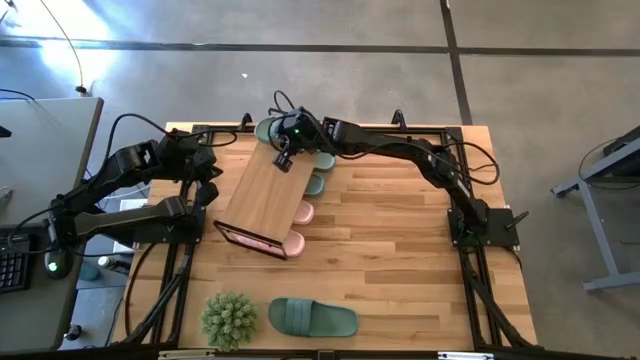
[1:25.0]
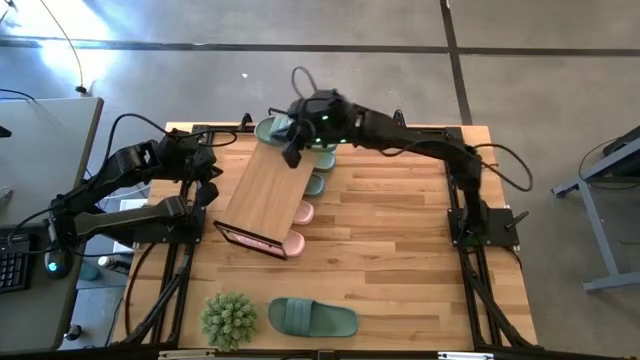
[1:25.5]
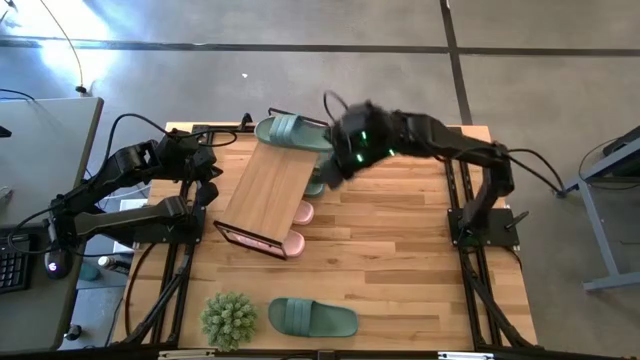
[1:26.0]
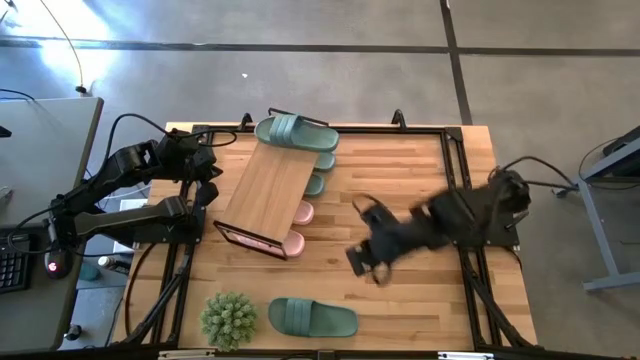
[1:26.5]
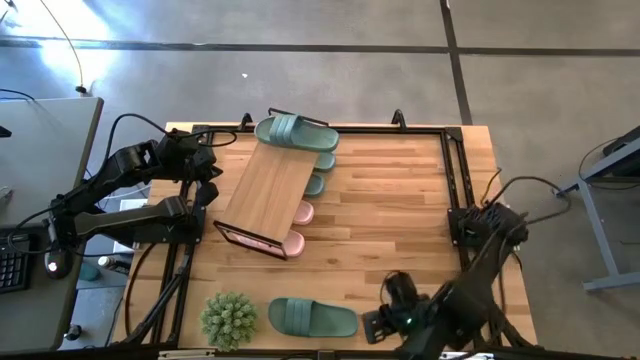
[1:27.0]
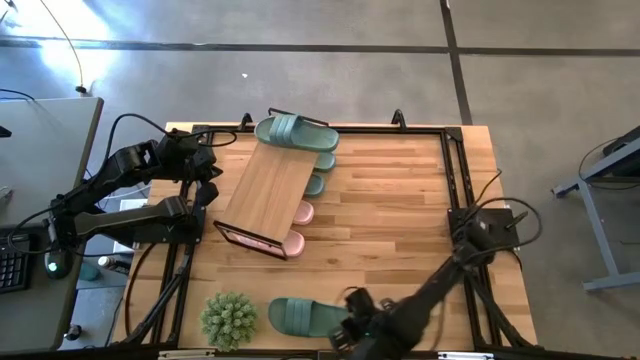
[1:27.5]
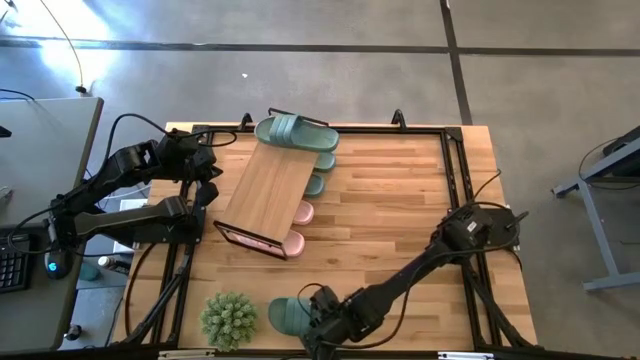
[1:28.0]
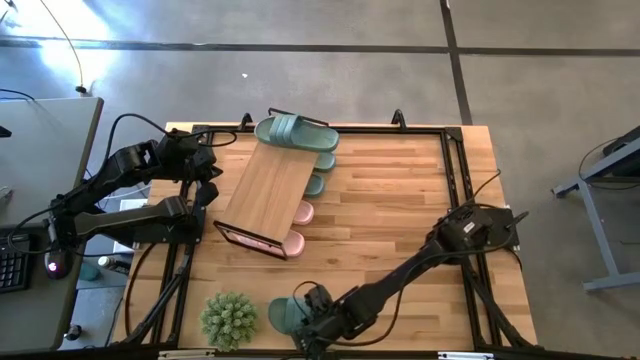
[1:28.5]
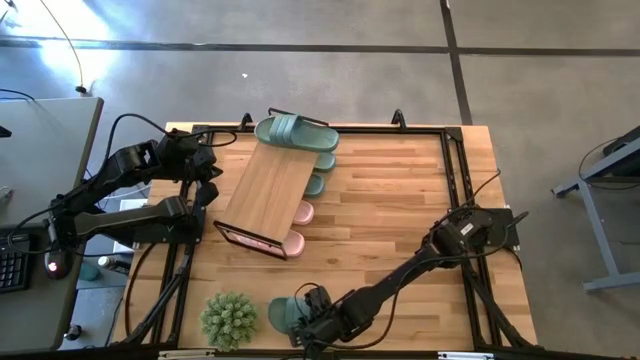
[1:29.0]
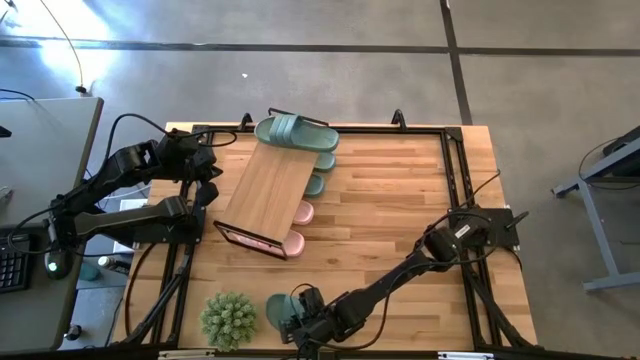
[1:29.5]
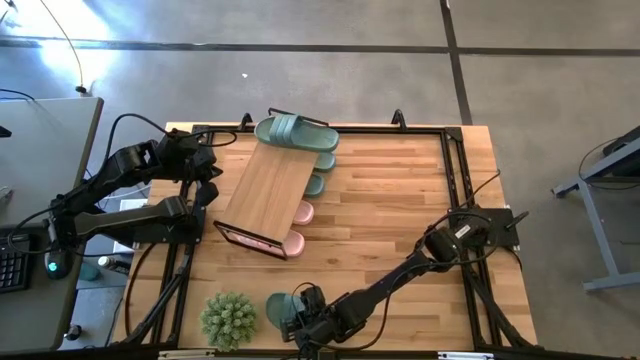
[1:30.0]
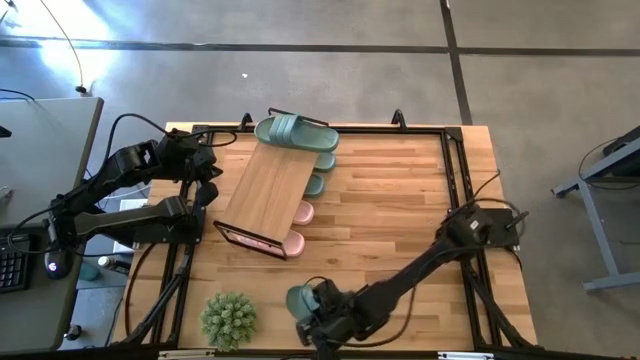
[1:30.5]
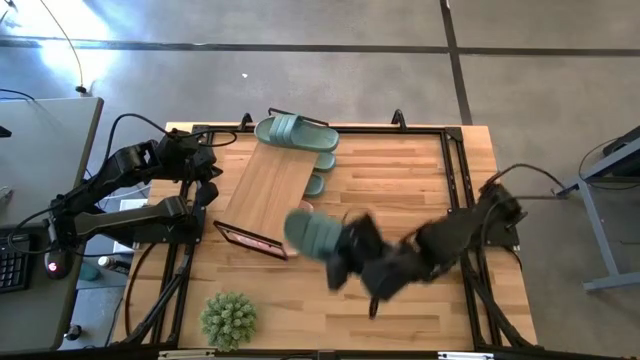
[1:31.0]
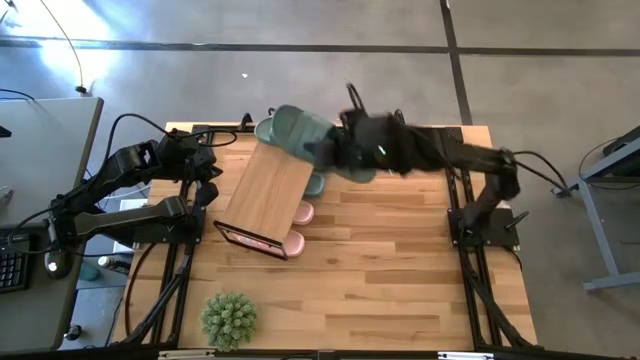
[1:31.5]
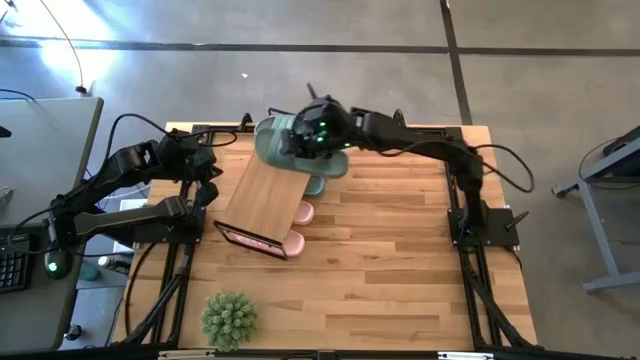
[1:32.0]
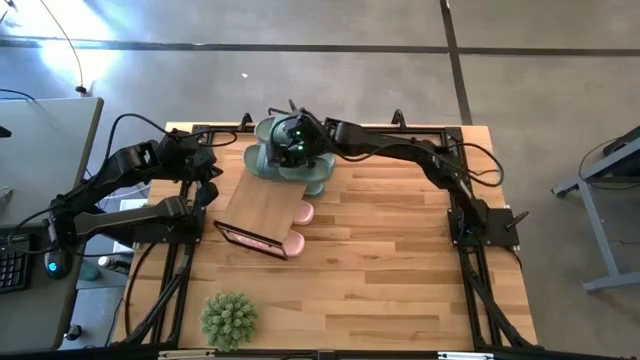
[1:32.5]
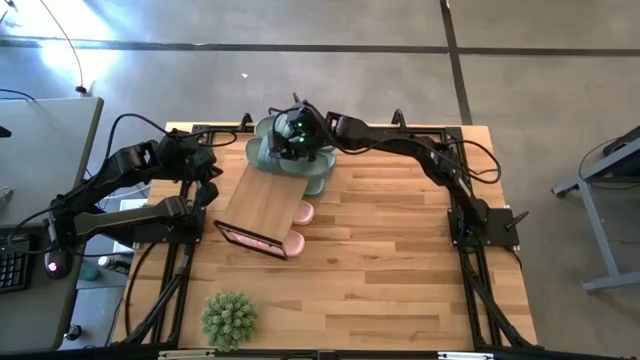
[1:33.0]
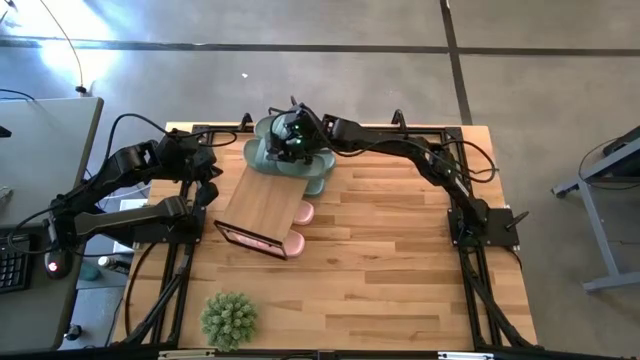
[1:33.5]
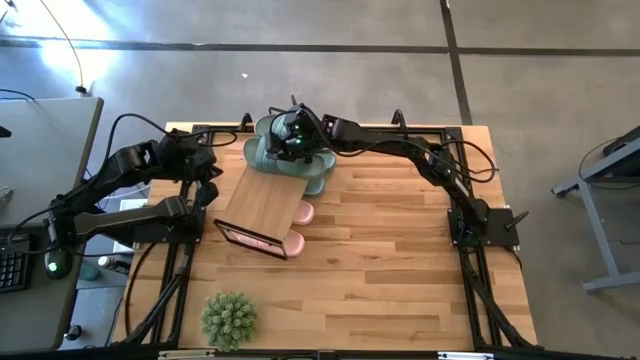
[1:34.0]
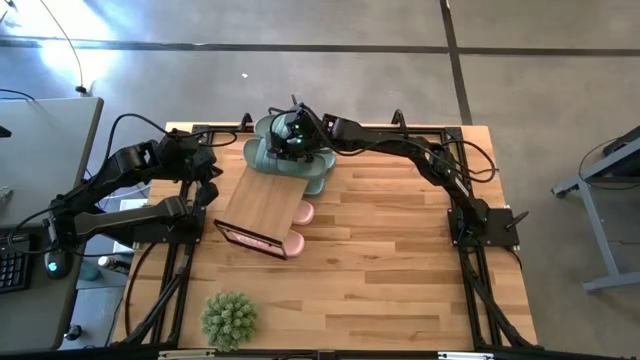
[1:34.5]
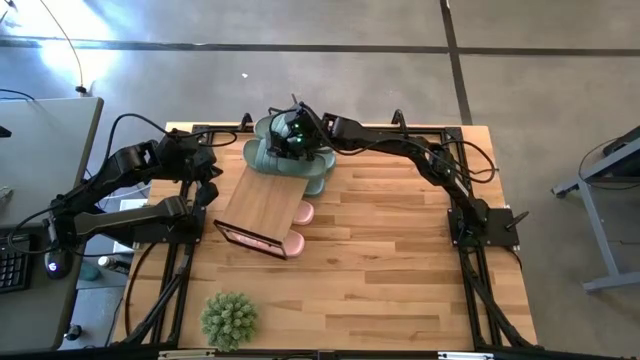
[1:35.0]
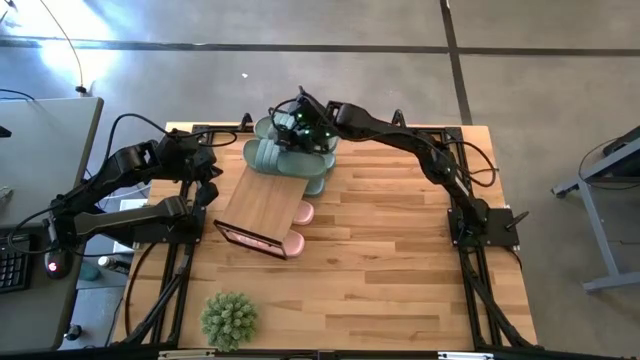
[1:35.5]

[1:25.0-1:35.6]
Task: Pick and place slides into the shelf
Put the green slide on the shelf

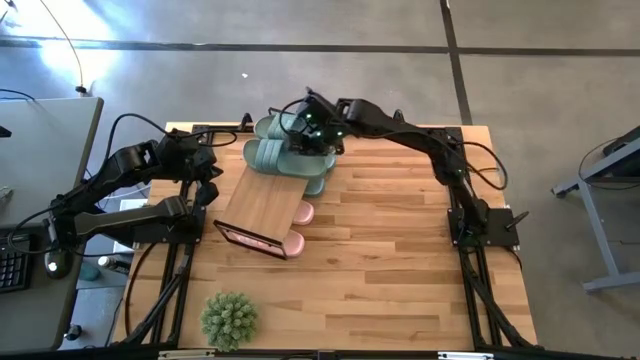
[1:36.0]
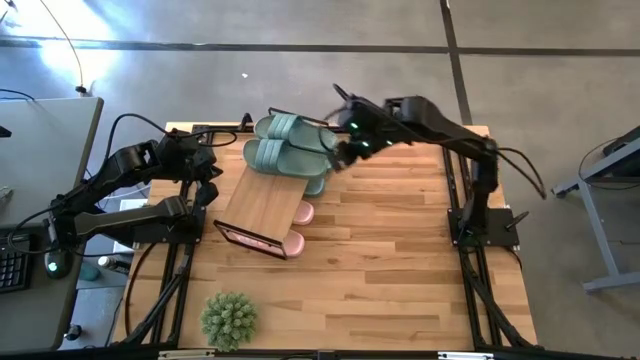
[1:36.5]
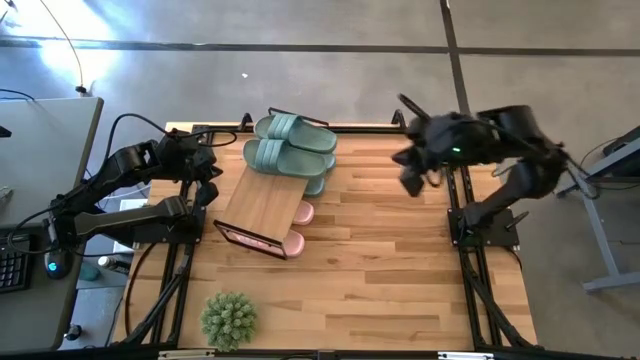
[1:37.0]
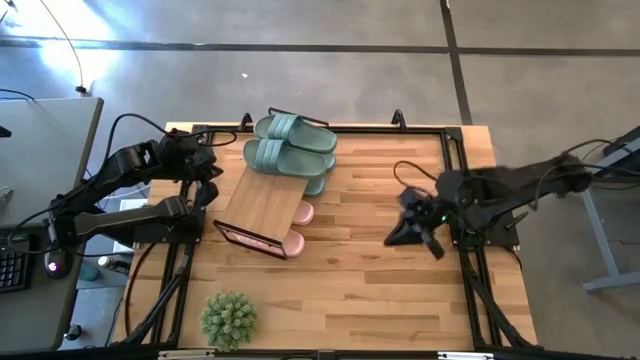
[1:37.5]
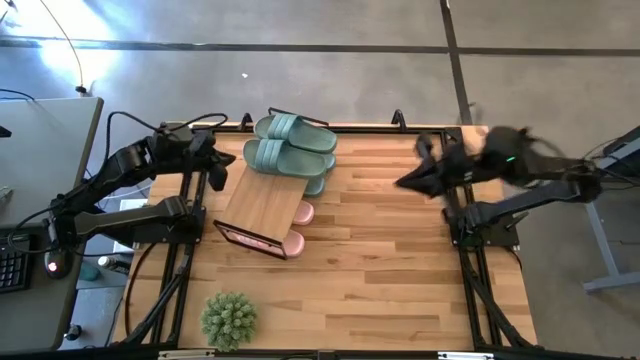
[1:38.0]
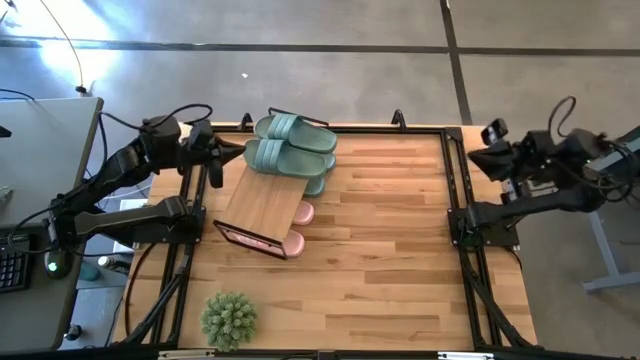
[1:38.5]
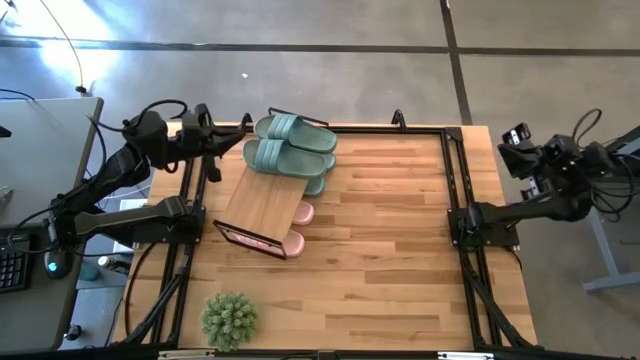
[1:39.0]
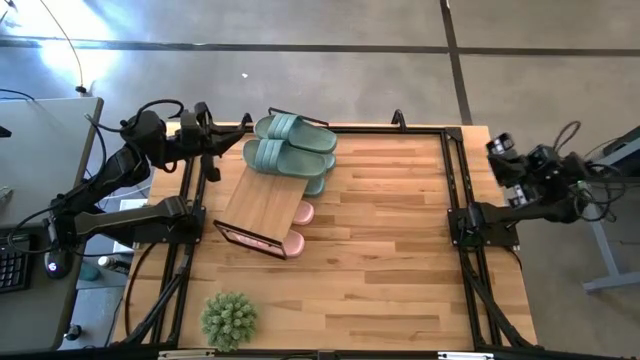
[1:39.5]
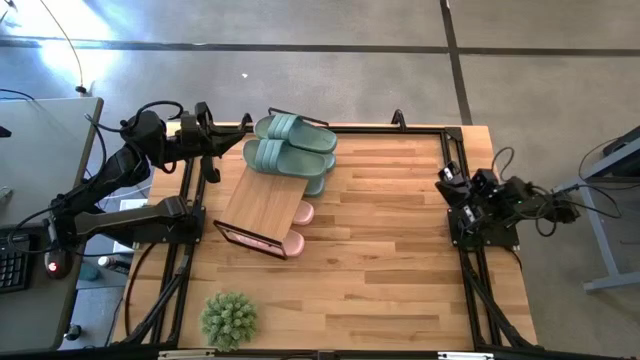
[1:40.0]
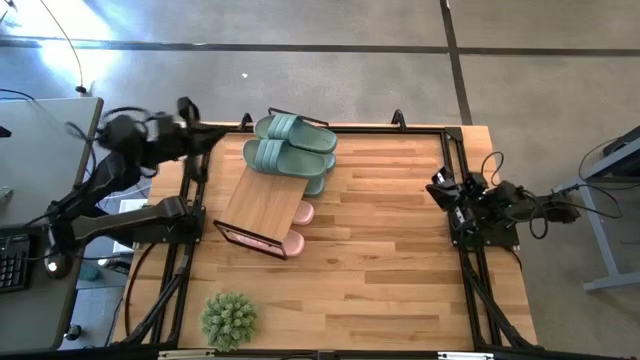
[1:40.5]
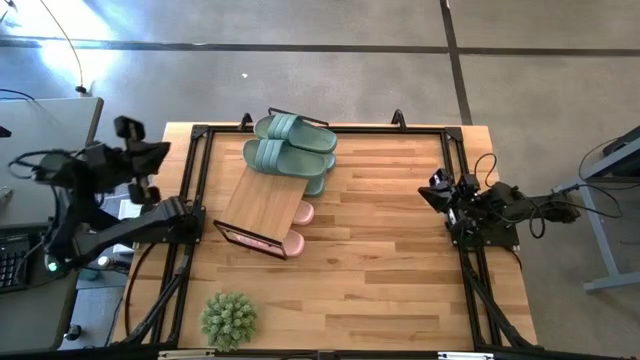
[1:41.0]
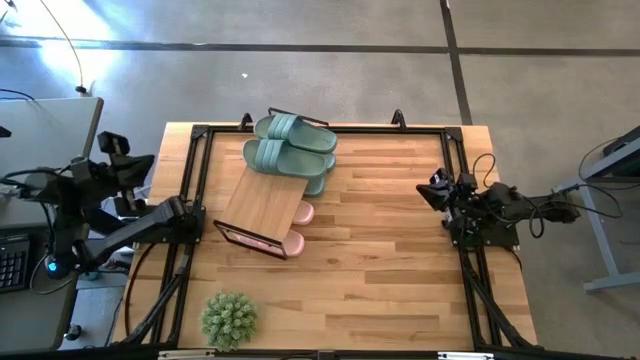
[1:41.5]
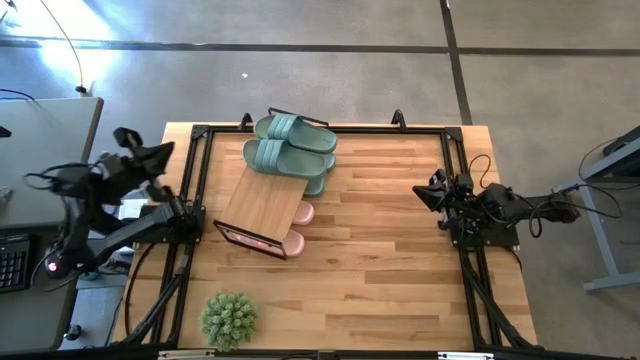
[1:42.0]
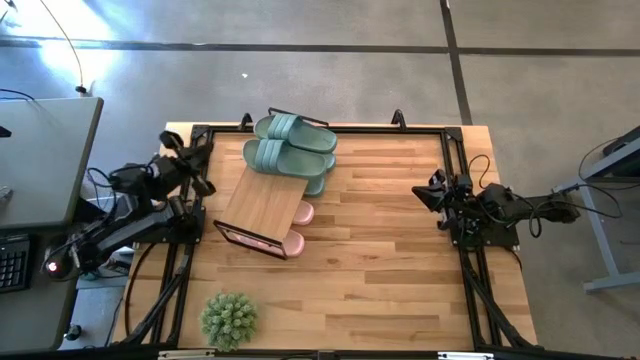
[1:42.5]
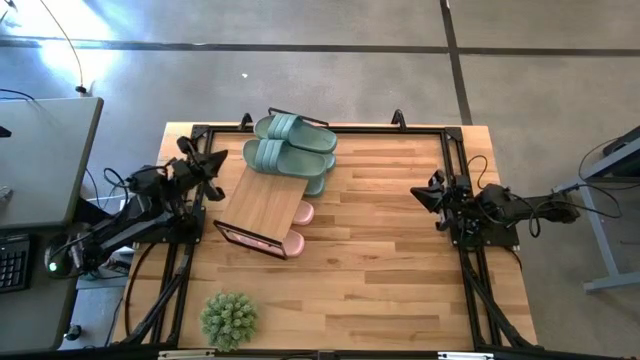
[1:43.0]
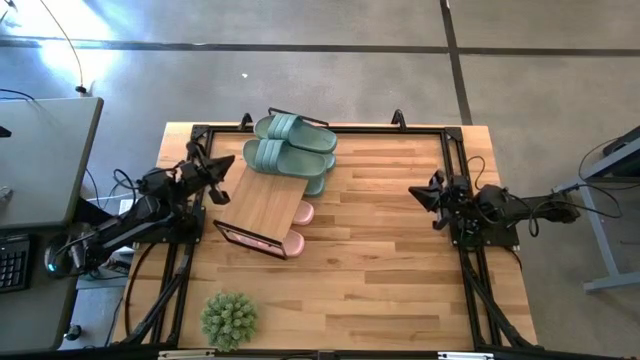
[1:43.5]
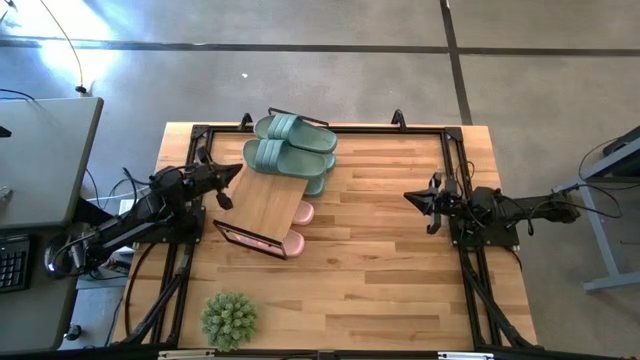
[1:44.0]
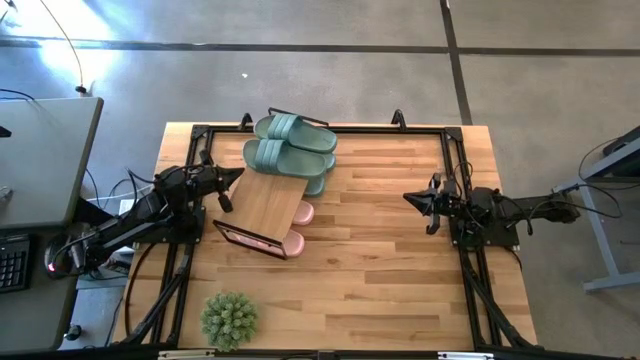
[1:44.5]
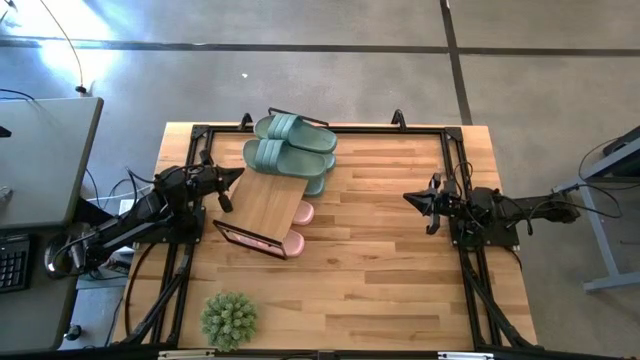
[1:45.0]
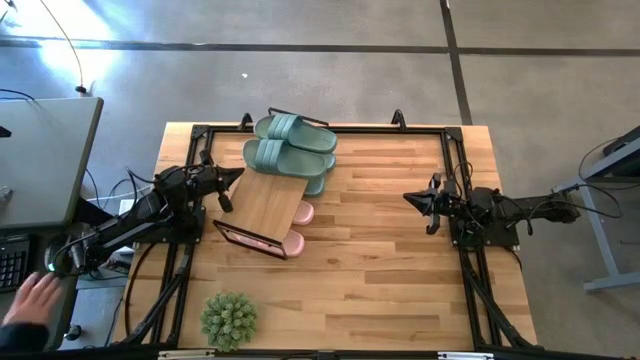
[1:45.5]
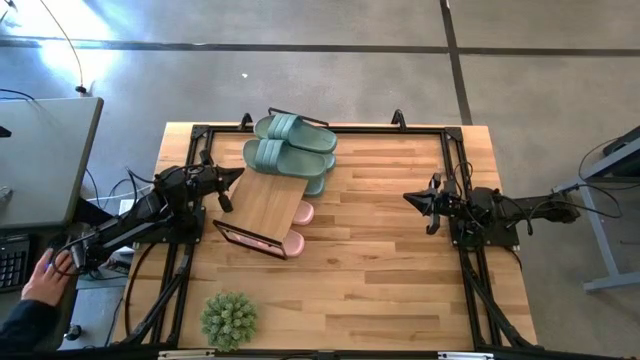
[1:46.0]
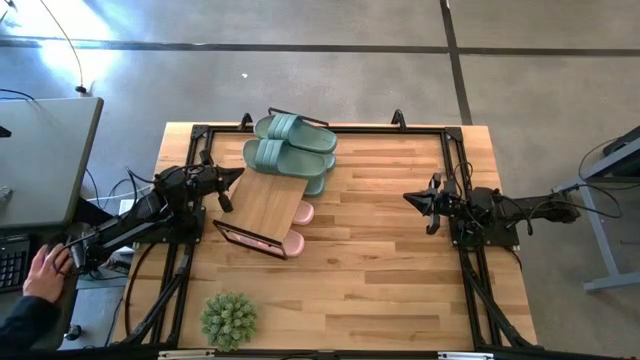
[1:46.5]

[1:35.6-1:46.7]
Return to Home Position
